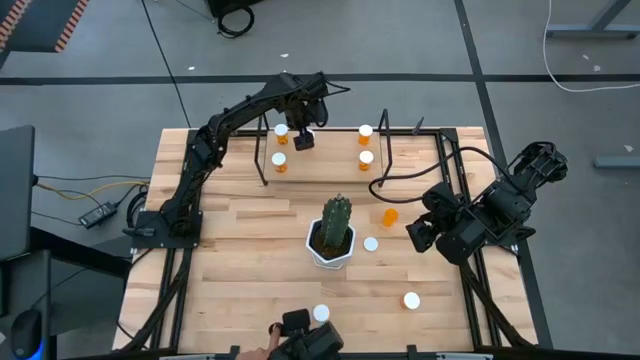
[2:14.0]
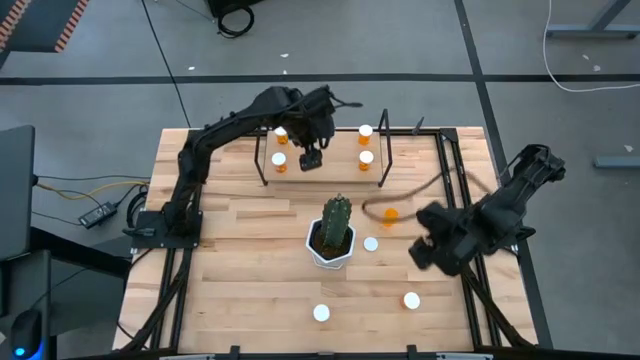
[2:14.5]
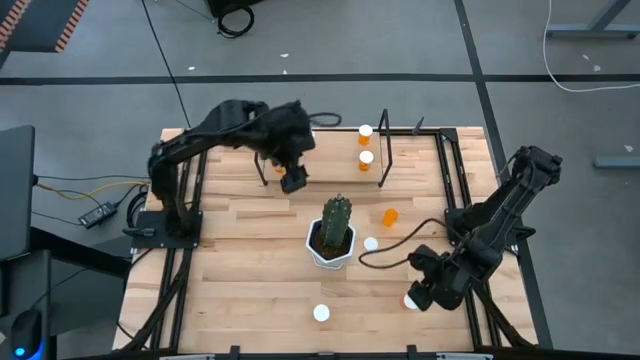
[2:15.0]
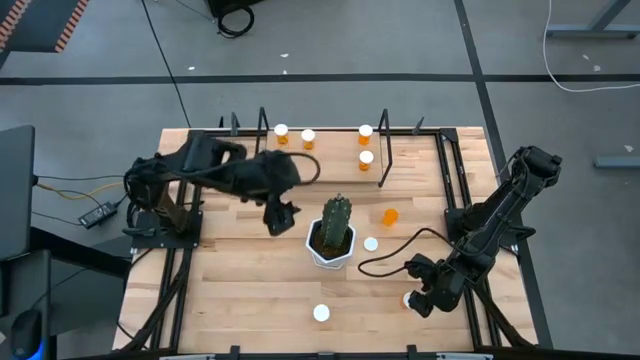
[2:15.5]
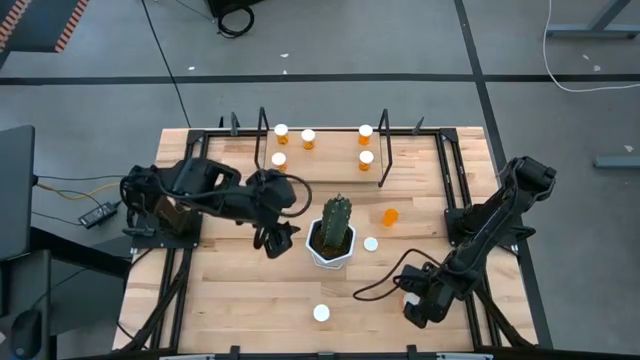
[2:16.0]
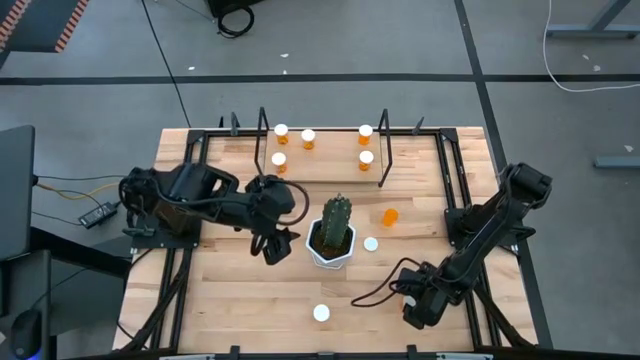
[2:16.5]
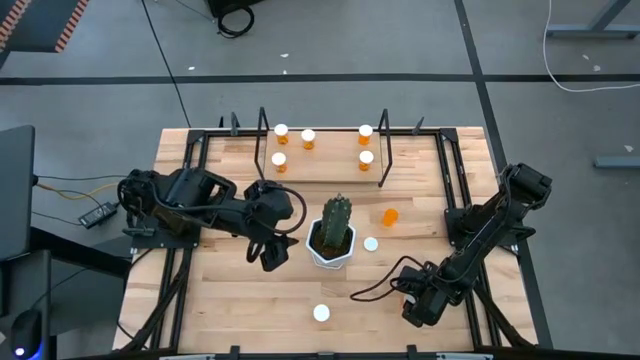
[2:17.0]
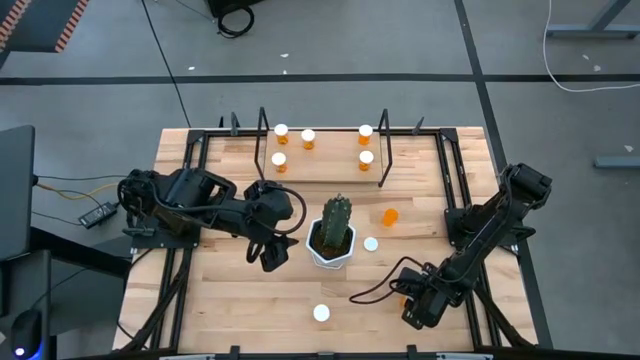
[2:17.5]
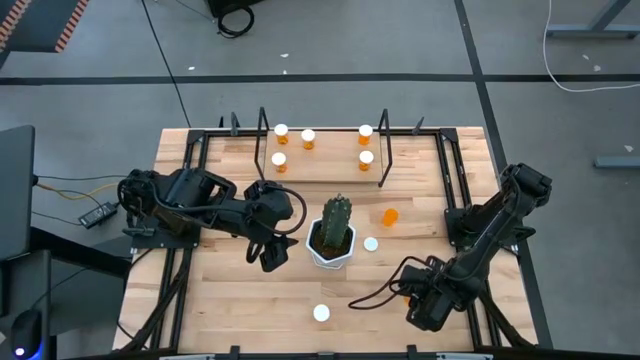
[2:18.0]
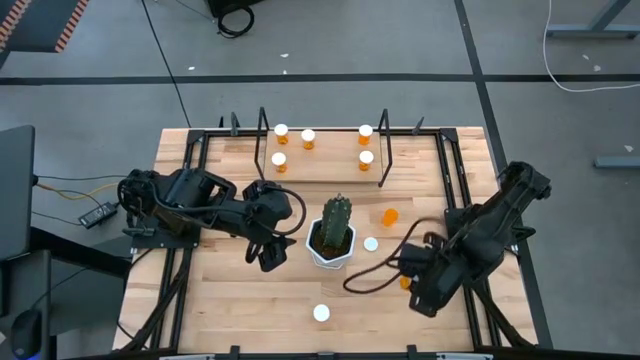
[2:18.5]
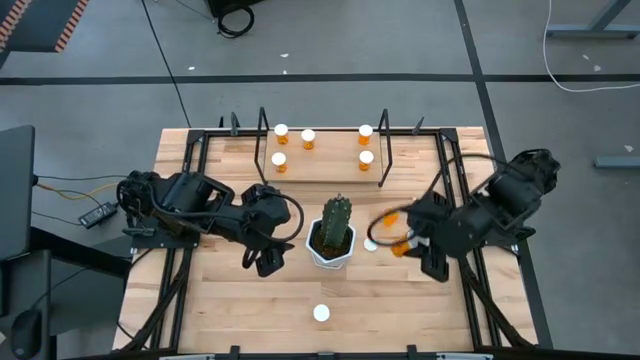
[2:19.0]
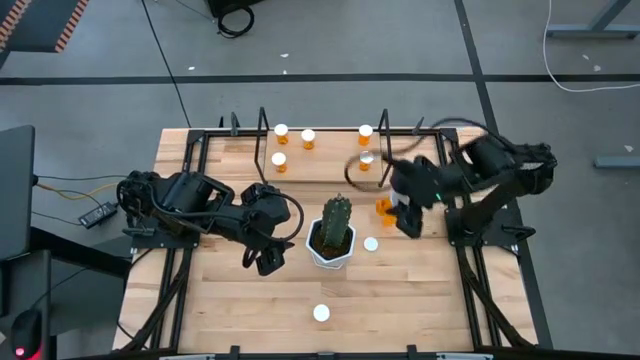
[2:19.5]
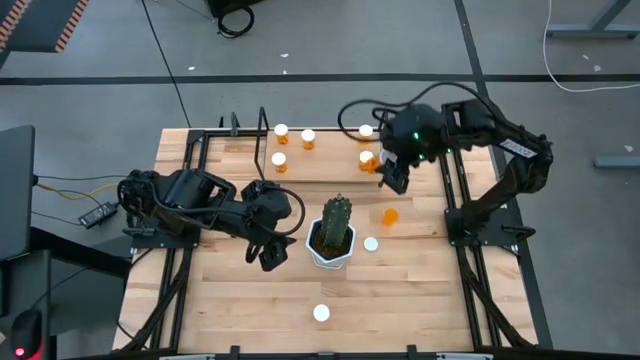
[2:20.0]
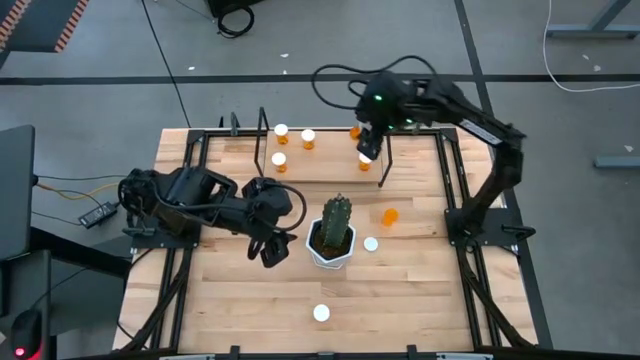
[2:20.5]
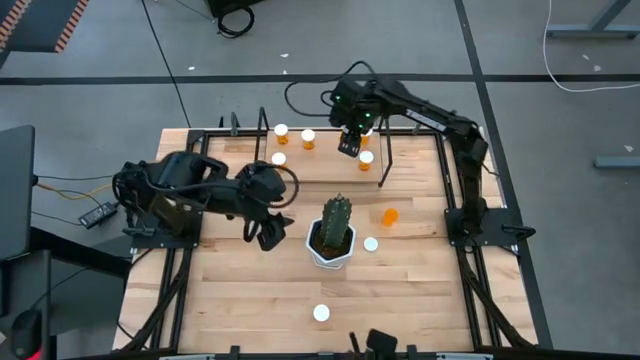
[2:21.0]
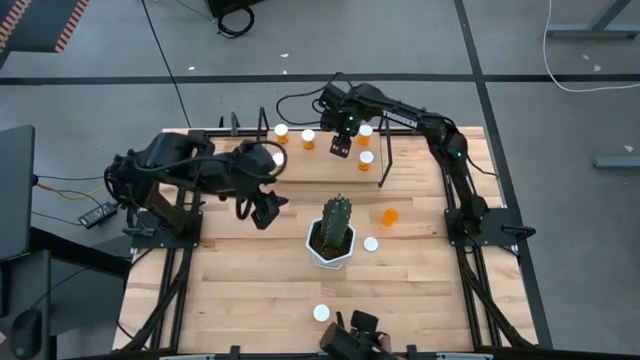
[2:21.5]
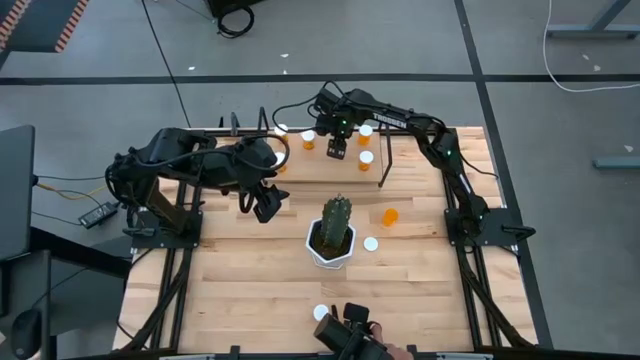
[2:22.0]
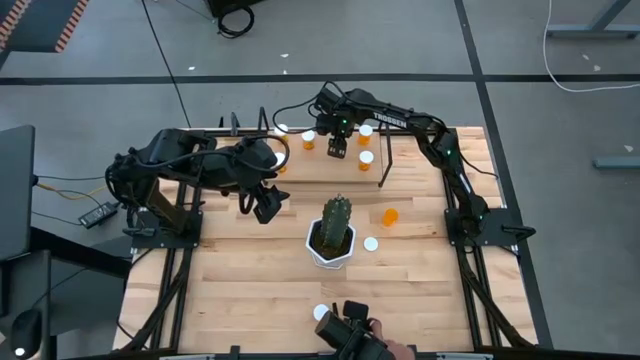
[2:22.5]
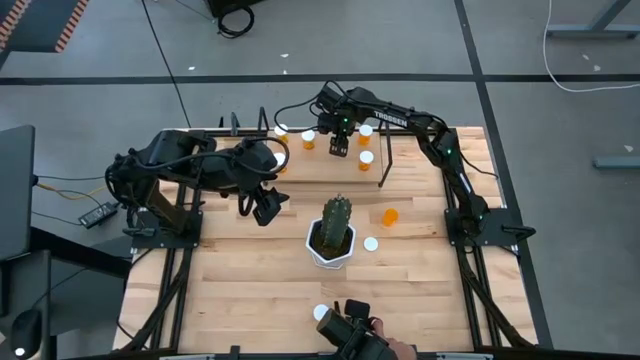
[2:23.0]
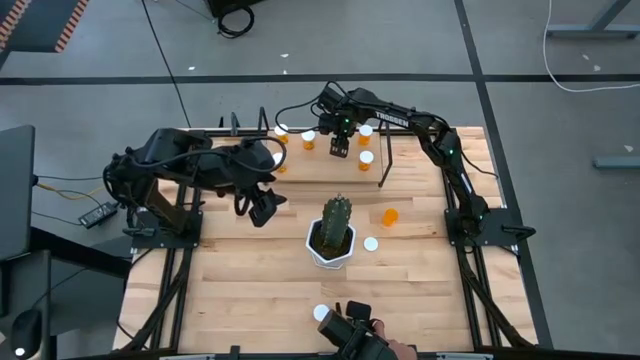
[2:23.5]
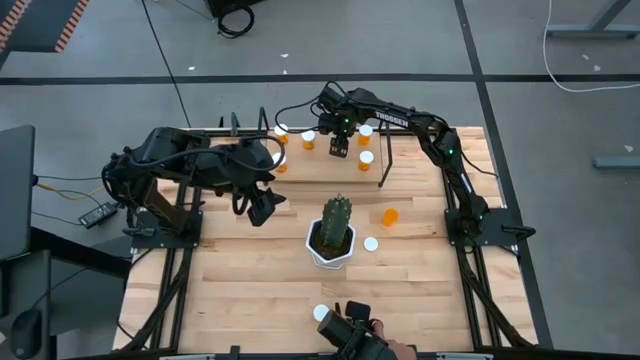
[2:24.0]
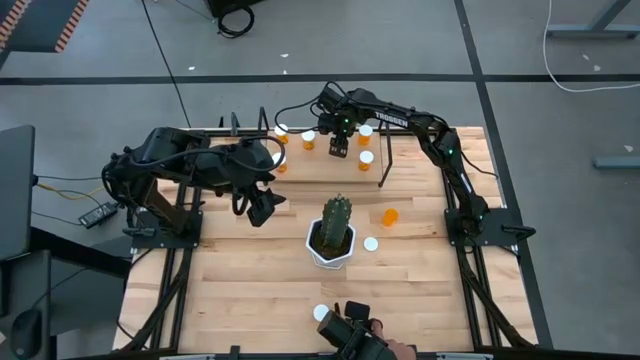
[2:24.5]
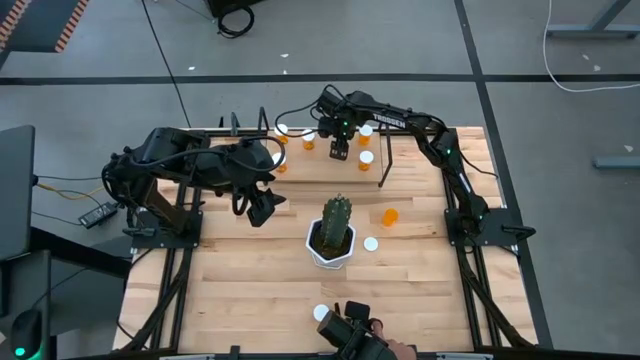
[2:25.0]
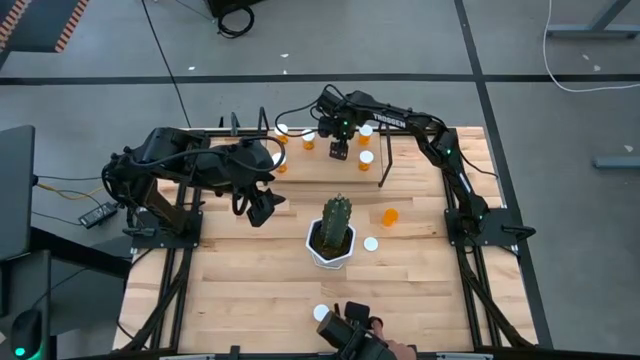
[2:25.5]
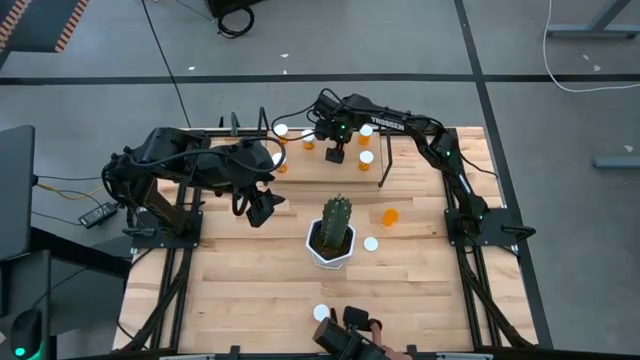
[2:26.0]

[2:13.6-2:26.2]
Task: Pick and place medicine bottles onto shelf by color
Put the orange medicine bottle on the shelf

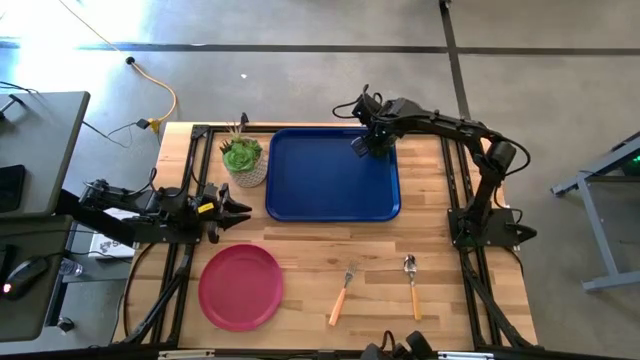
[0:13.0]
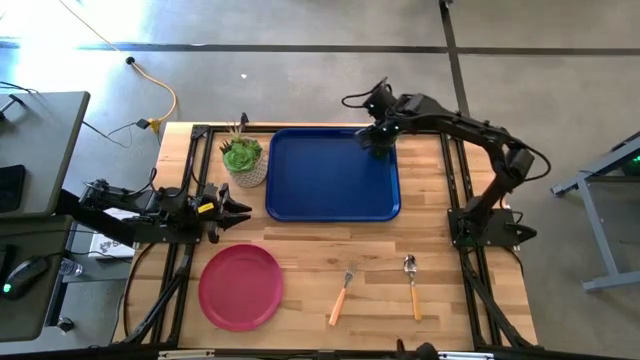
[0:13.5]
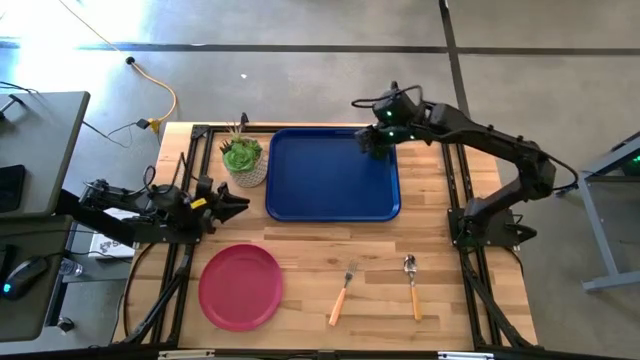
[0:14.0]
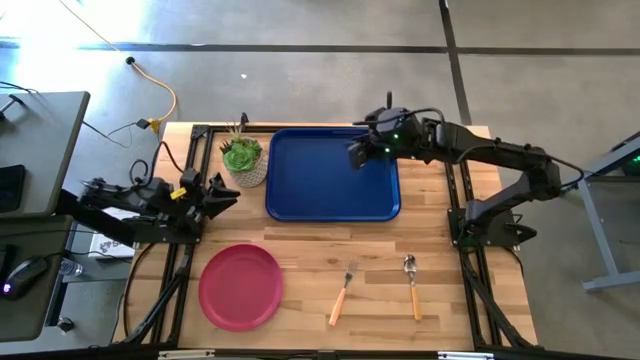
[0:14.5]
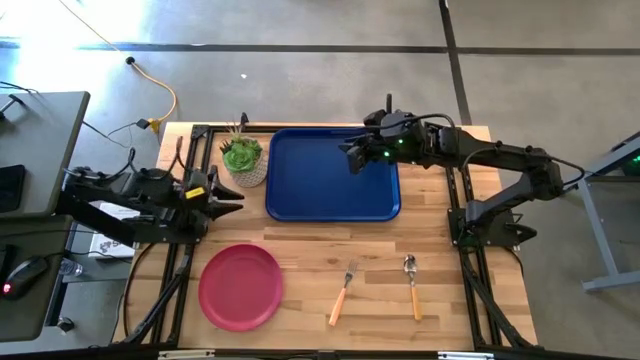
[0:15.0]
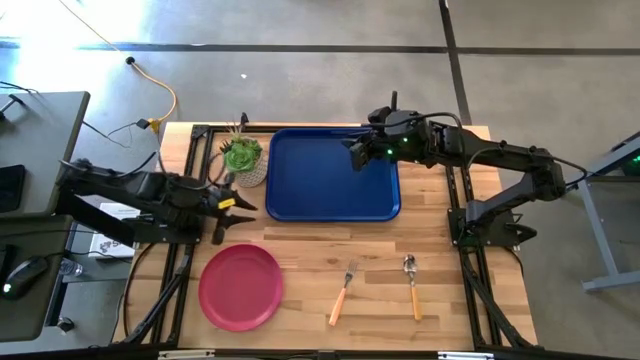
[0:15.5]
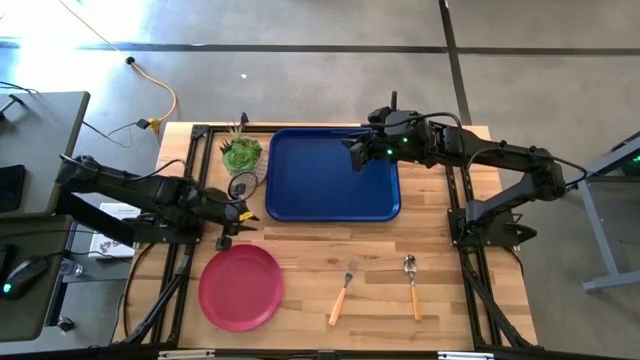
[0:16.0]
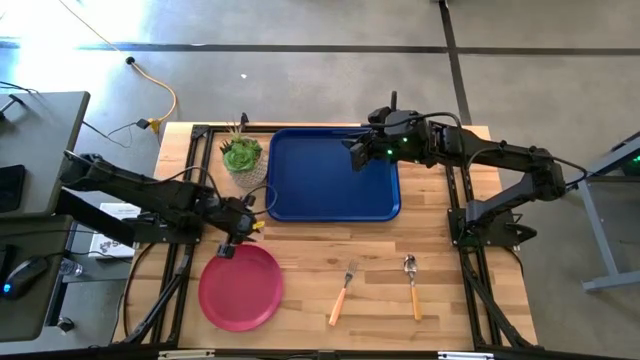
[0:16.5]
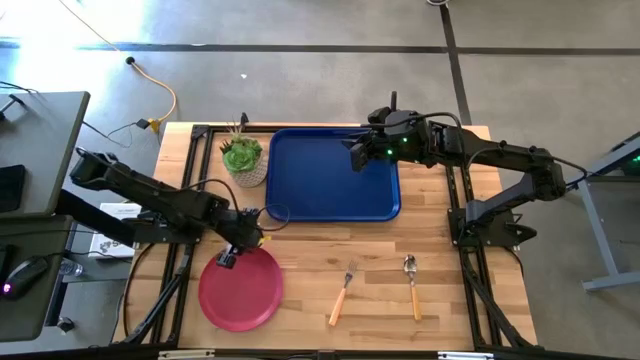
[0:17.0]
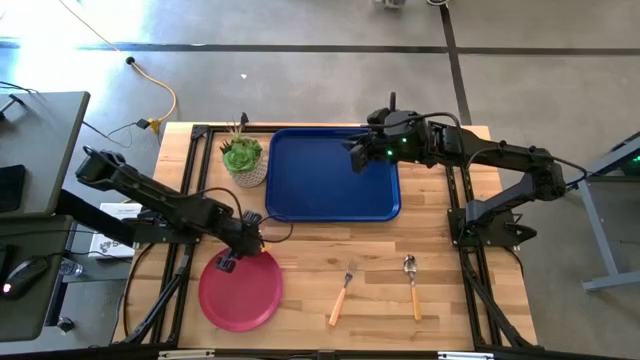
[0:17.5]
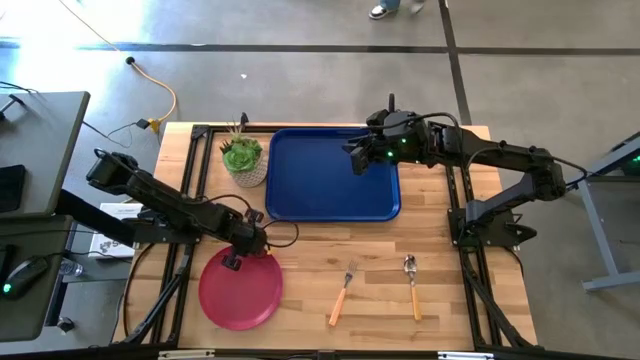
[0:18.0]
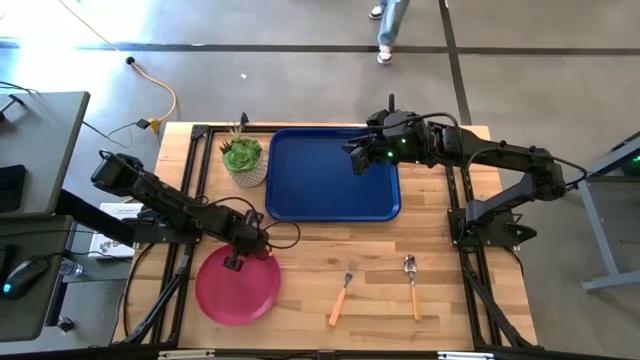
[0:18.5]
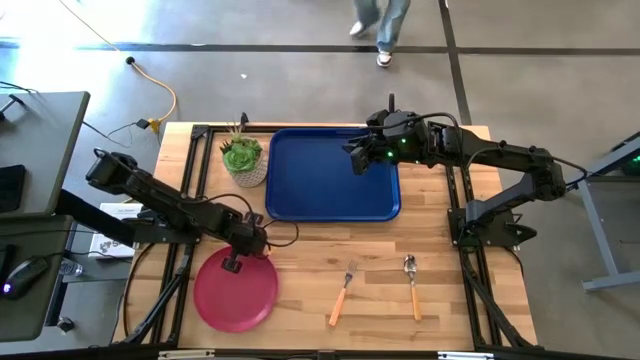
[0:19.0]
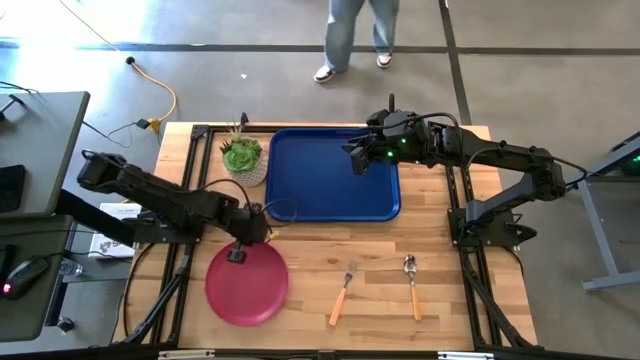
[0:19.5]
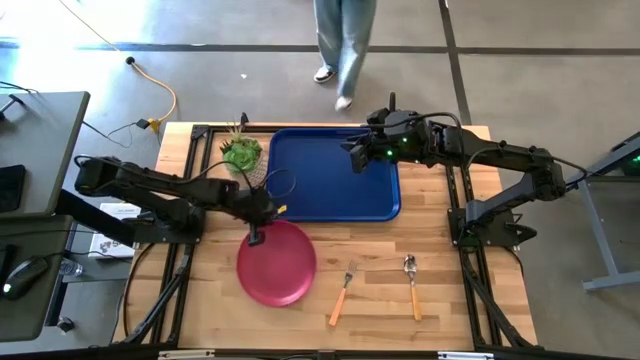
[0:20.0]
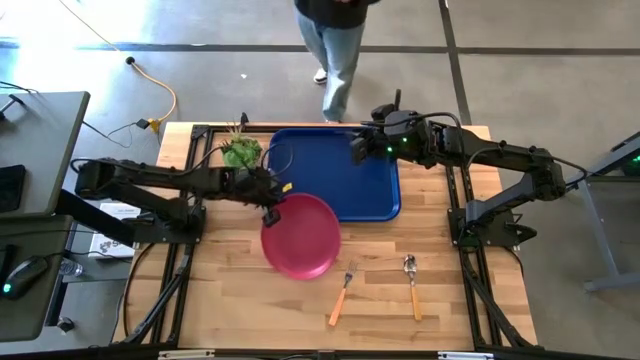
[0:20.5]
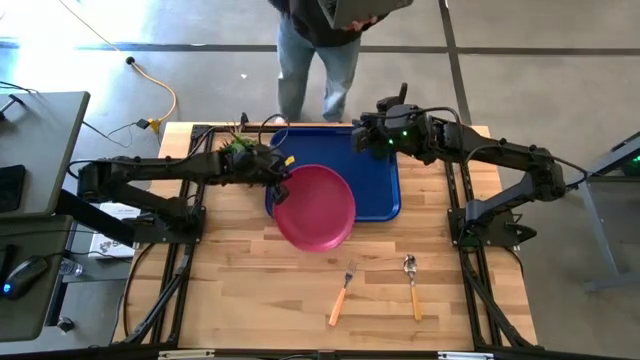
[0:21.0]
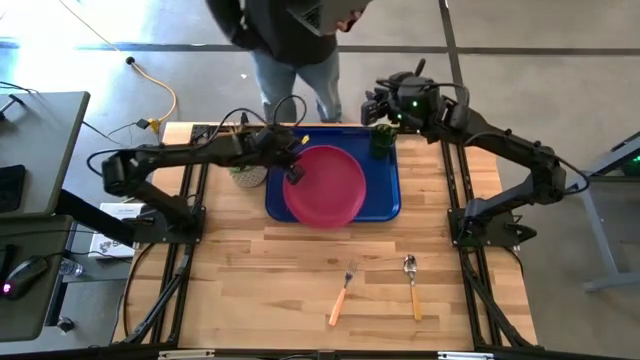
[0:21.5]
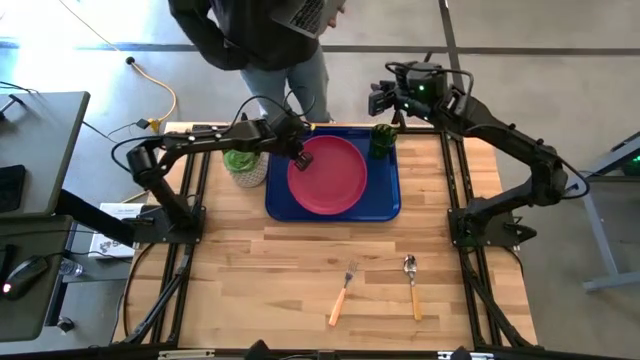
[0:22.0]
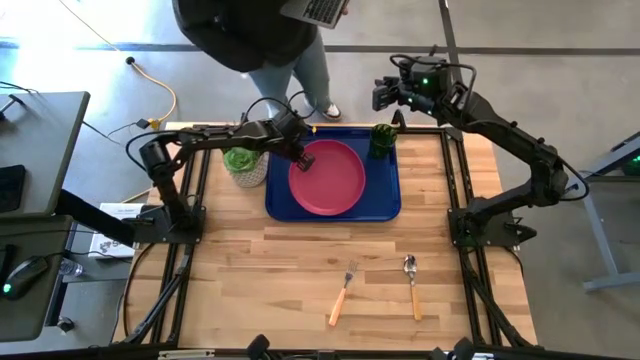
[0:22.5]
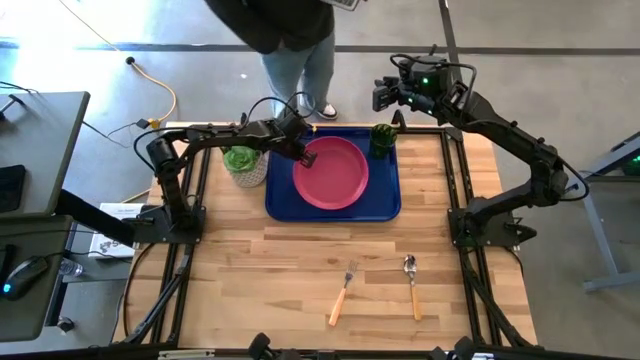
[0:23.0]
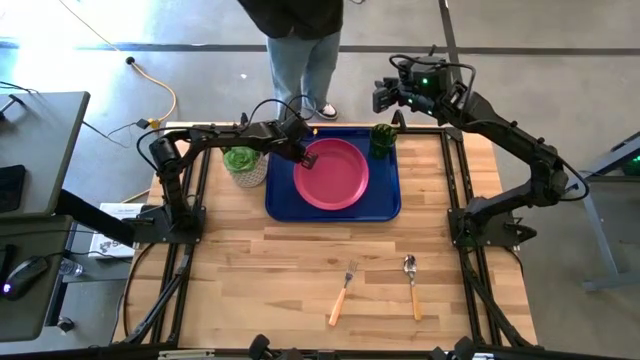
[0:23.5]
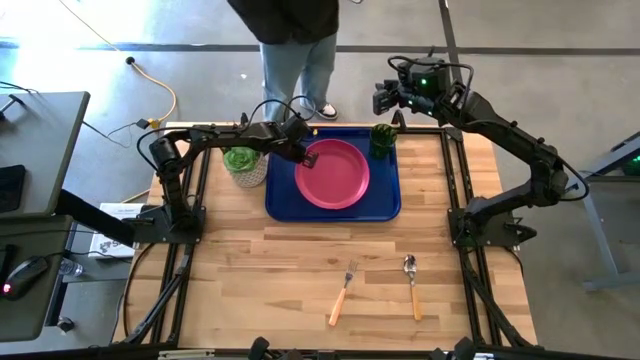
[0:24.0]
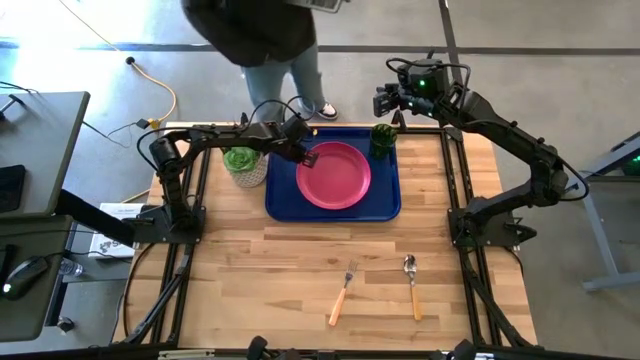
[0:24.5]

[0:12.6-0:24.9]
Task: Pick and place plate/cup/fork/spoon on tray
Put the pink plate on the blue serving tray to the bottom left of the green cup
